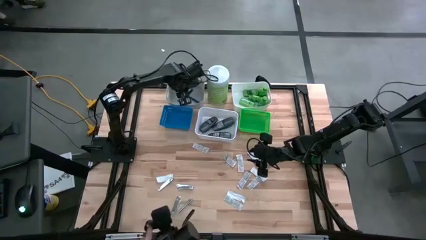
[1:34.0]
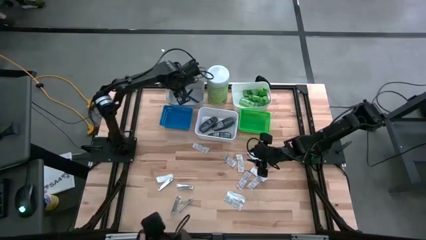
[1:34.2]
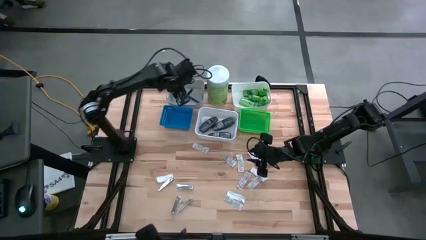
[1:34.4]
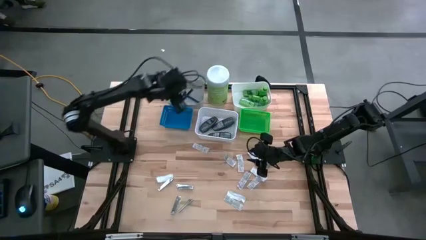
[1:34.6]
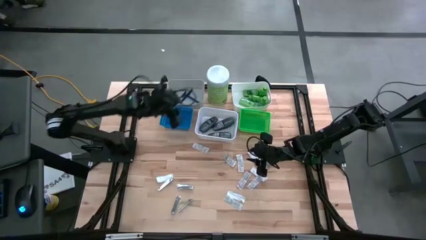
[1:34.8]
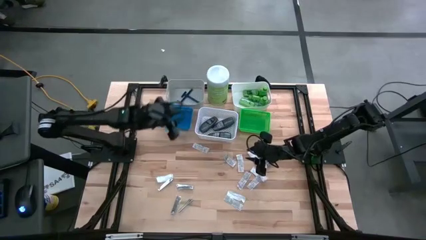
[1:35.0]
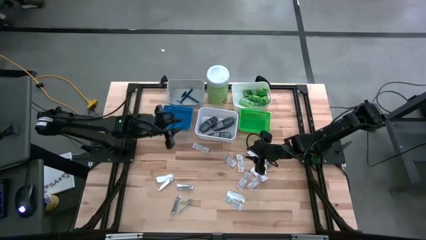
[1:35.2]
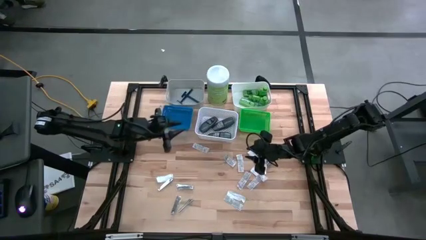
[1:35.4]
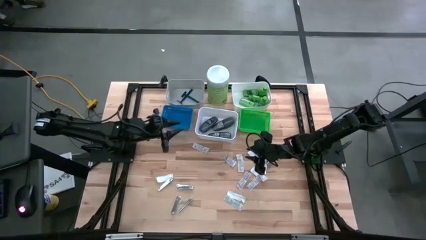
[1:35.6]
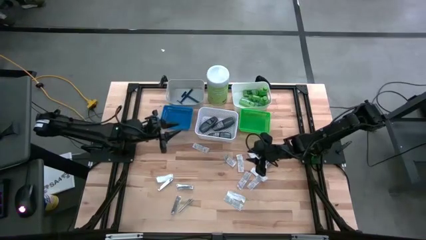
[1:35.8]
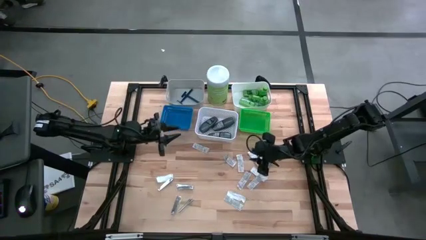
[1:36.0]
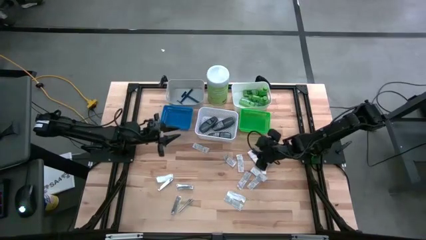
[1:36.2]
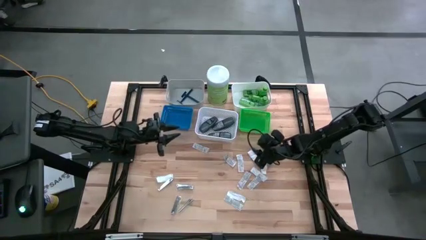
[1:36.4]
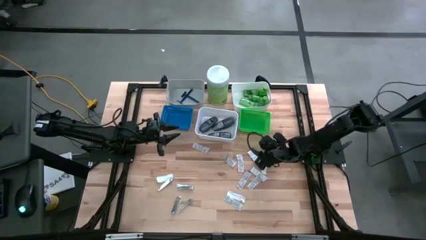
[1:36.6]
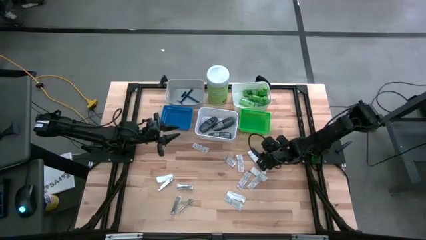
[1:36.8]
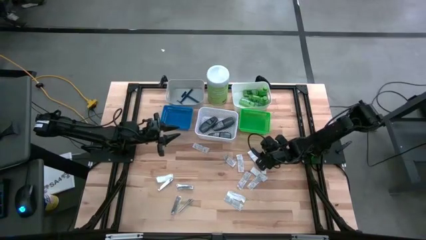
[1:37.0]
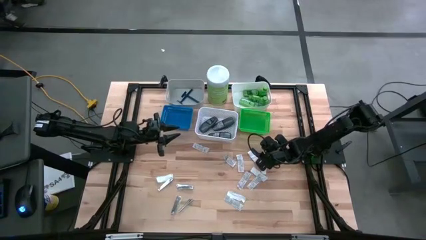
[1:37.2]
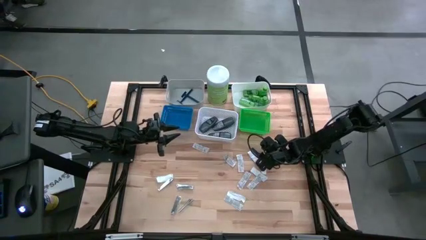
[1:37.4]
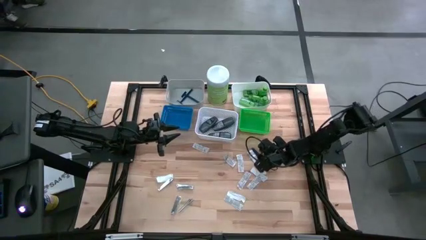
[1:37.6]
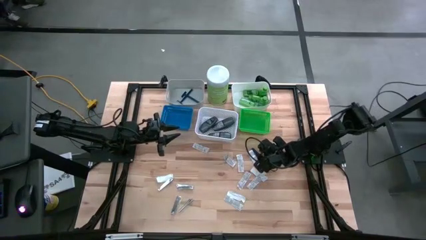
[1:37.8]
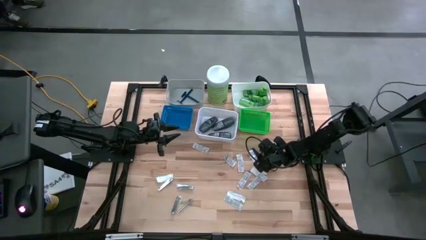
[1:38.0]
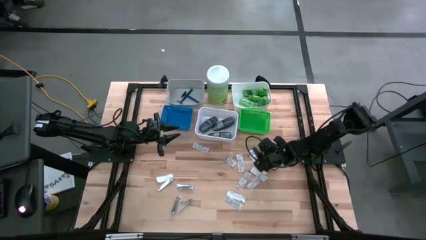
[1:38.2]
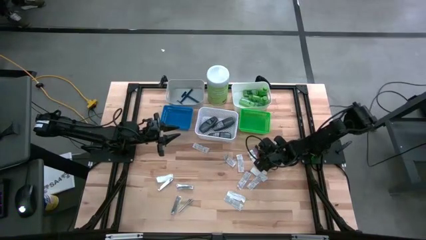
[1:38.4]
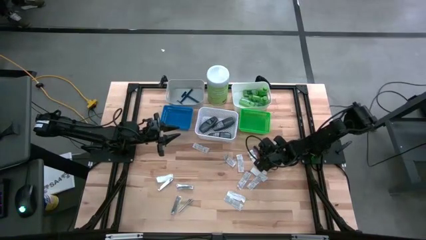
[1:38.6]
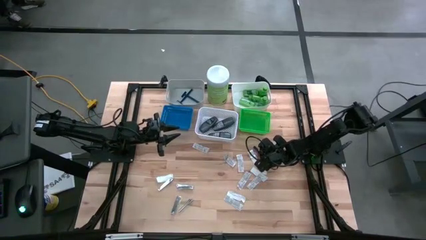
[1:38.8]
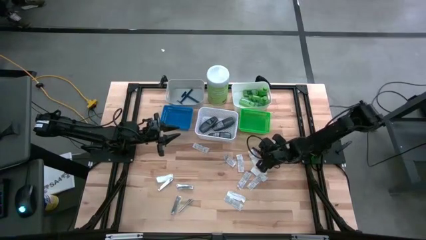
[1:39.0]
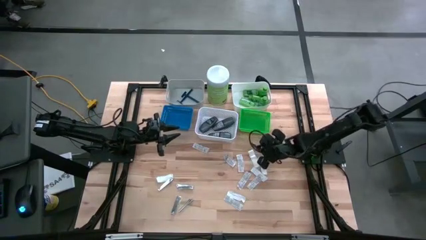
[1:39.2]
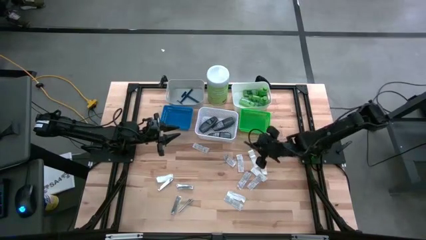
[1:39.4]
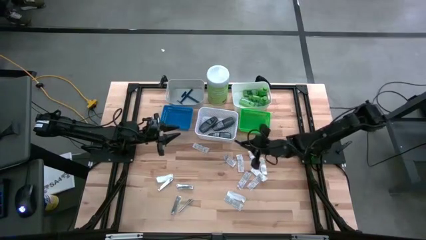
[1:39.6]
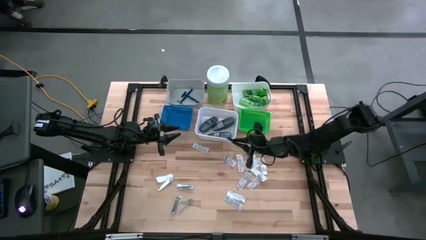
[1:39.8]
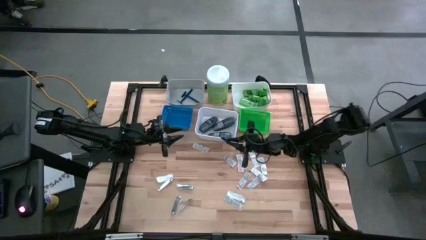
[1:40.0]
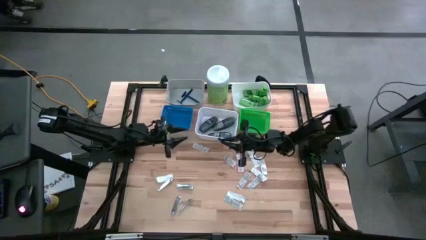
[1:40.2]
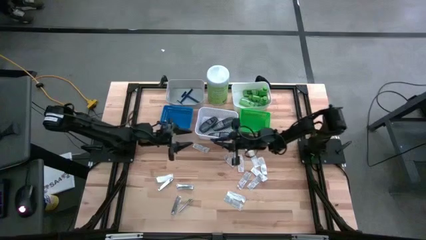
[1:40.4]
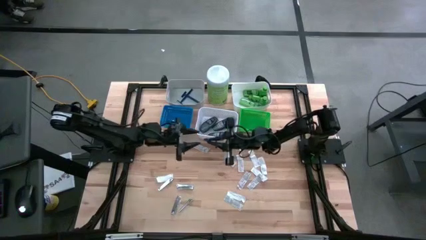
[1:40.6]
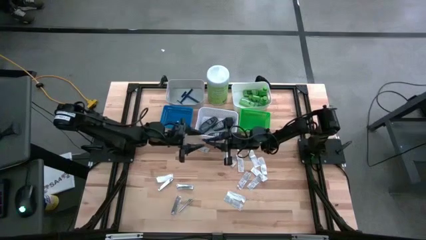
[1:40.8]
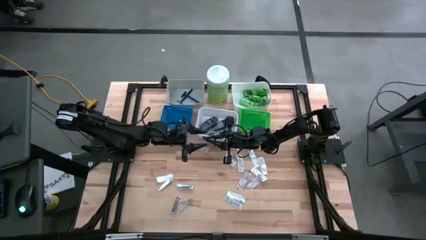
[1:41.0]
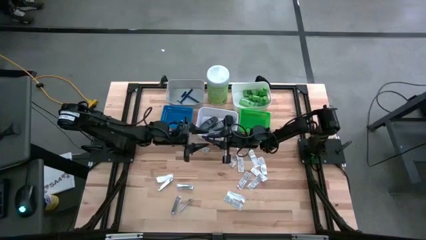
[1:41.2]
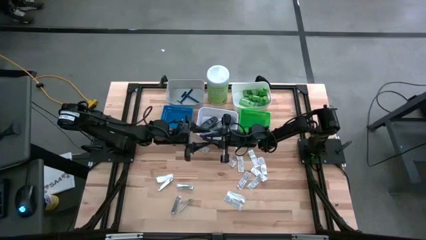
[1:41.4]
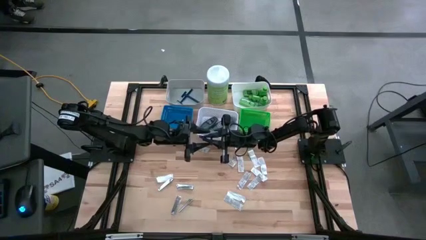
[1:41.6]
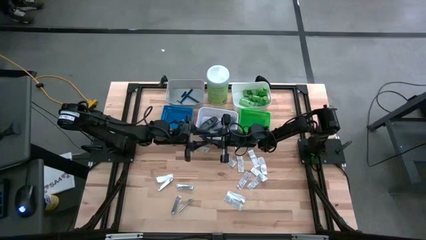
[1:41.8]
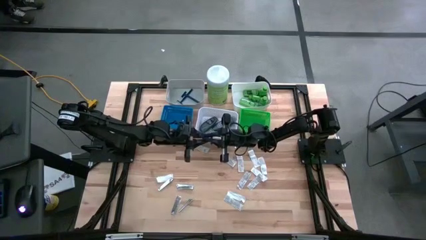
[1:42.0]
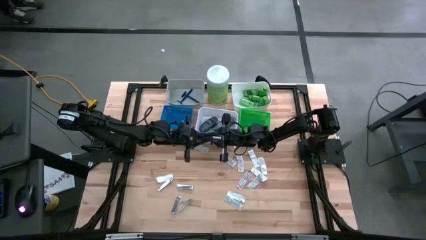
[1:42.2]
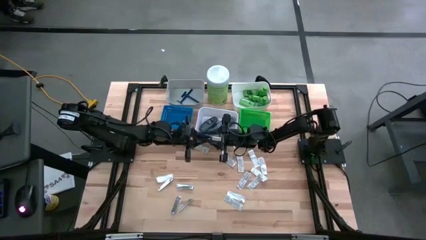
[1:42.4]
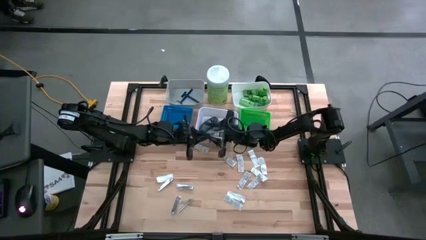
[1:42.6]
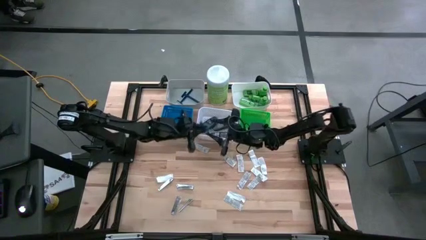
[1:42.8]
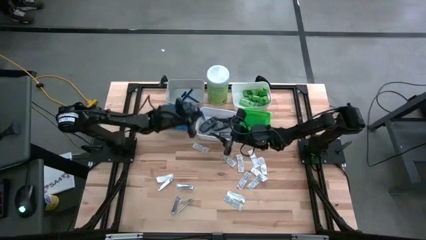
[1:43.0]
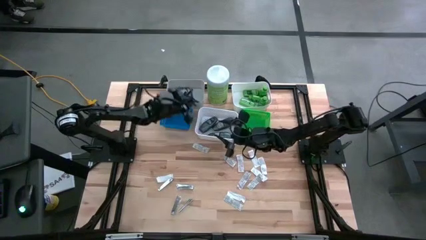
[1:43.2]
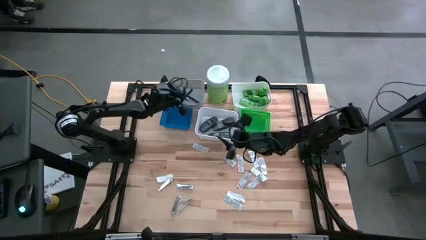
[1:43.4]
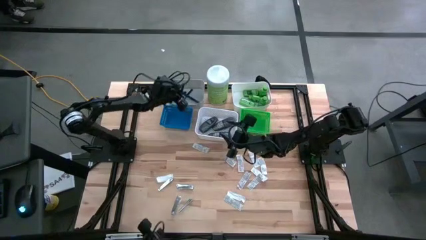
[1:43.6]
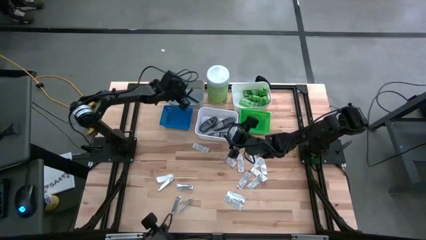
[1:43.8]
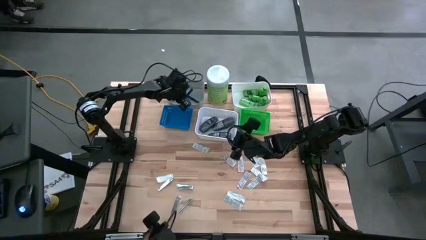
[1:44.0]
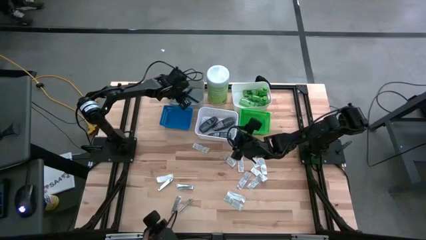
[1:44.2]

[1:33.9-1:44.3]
Task: Pick & Place Travel size toiletries
Put the blue razor into the grey bin

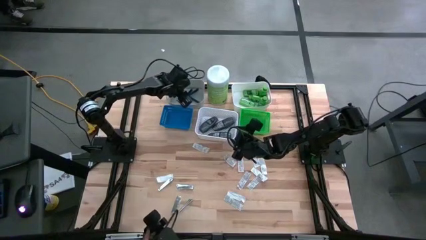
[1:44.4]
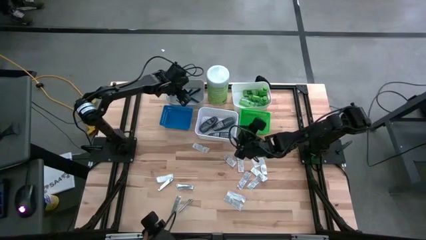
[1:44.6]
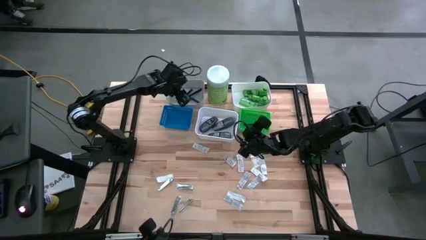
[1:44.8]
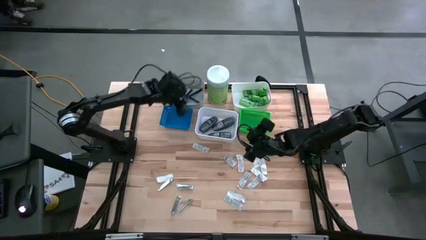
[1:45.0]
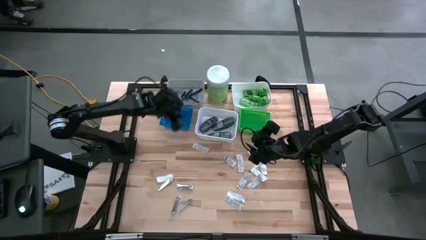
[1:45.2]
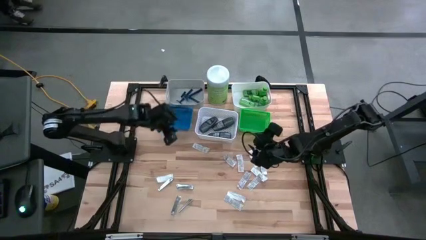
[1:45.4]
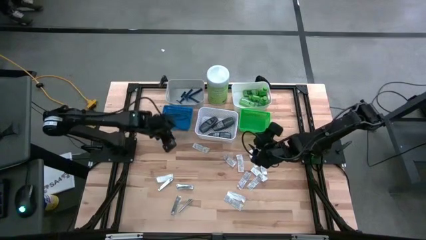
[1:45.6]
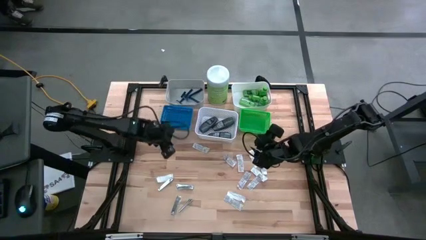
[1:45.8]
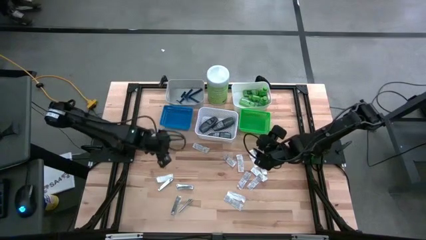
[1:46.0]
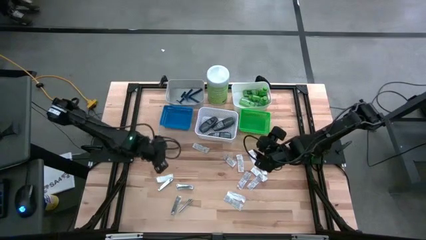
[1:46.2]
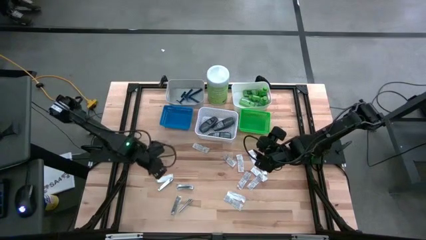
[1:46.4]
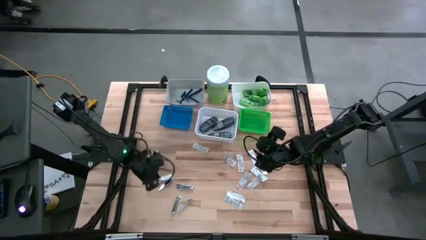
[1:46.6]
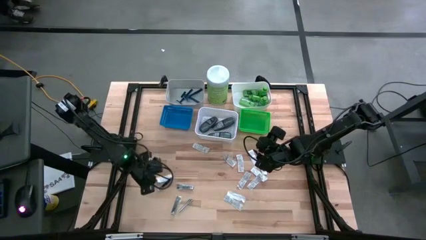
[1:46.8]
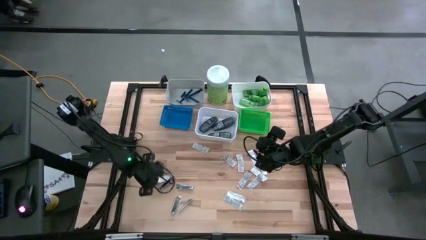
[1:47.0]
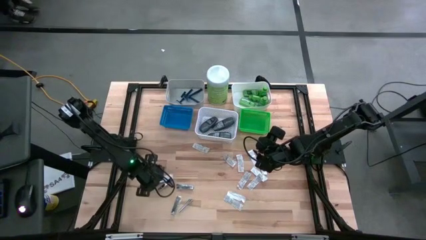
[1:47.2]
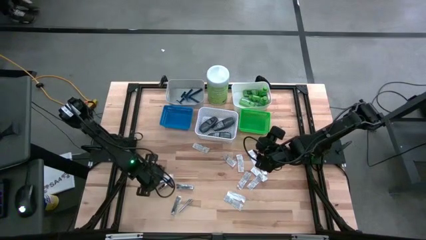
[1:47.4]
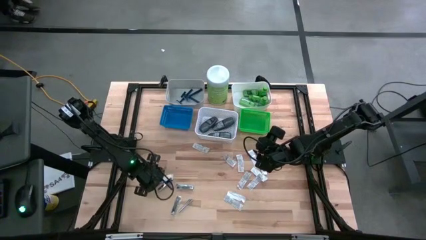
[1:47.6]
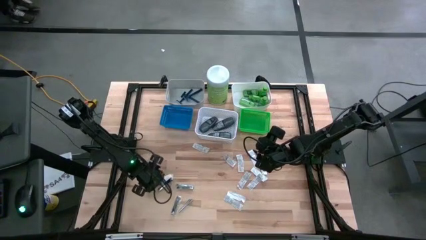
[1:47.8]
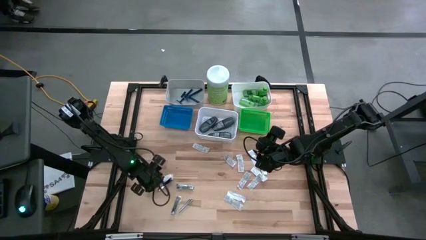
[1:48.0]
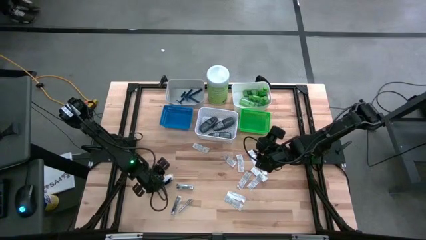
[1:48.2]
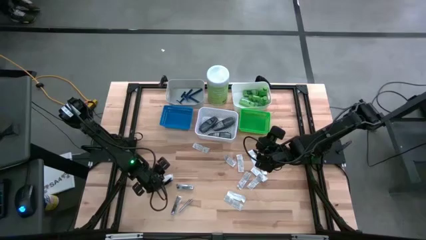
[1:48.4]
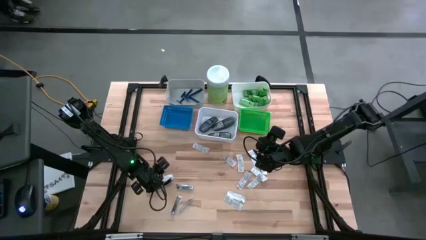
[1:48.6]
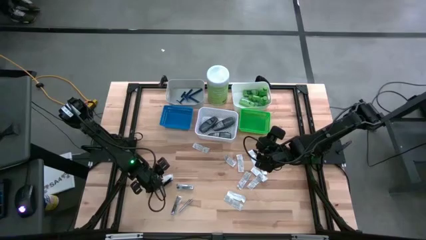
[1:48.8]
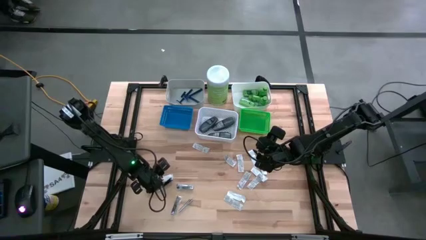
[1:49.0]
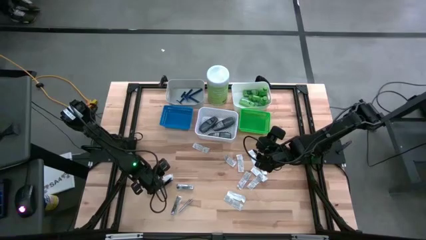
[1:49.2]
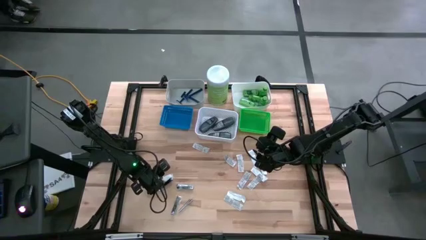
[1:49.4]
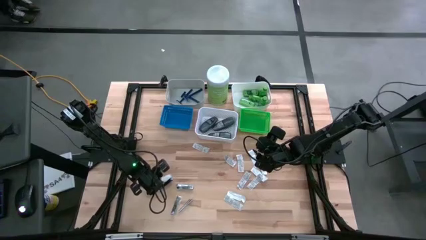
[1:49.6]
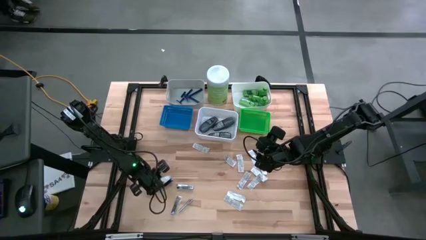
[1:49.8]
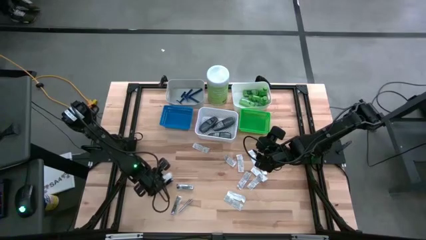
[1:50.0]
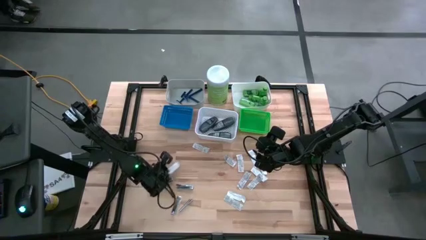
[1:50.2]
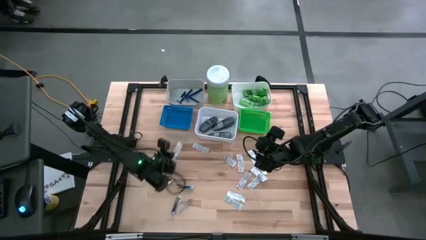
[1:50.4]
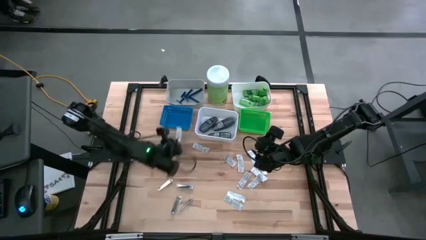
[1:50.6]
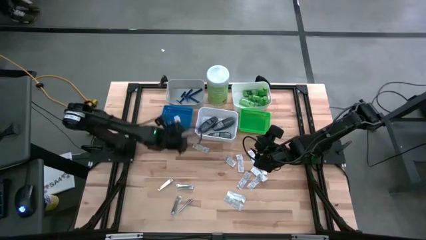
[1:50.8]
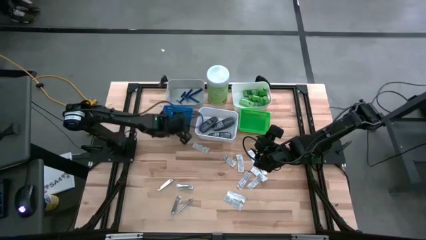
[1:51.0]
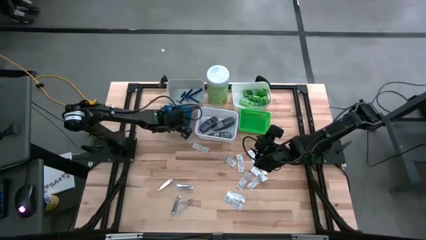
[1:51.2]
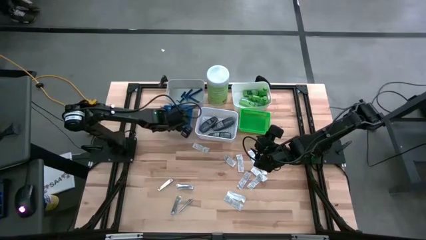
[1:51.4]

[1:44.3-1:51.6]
Put the white bandage into the blue bin
